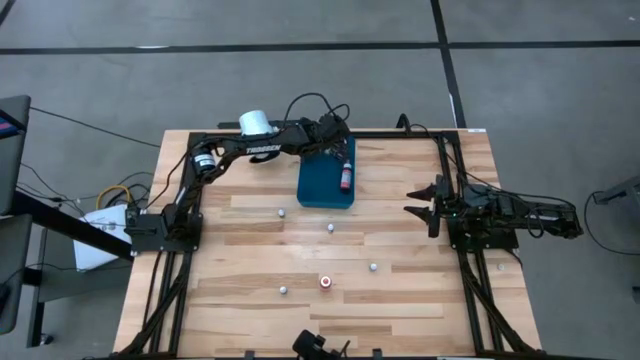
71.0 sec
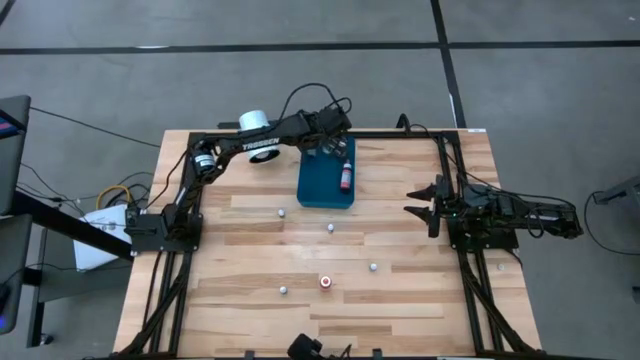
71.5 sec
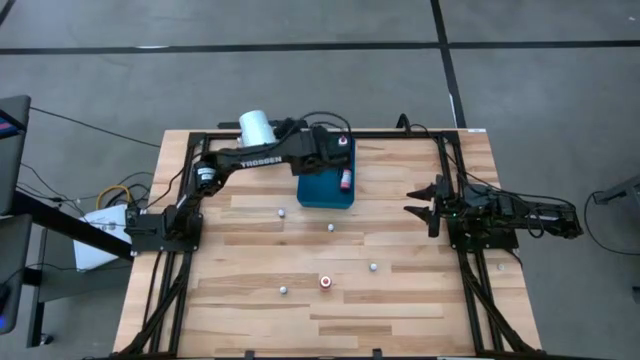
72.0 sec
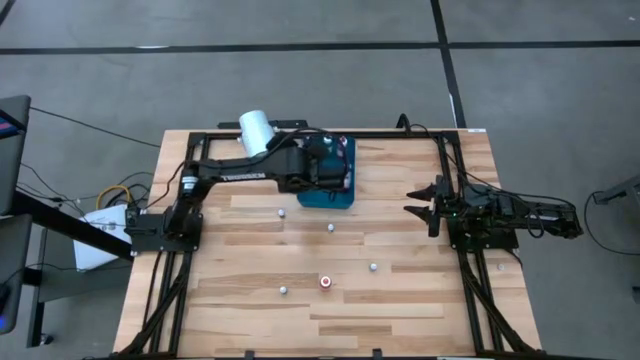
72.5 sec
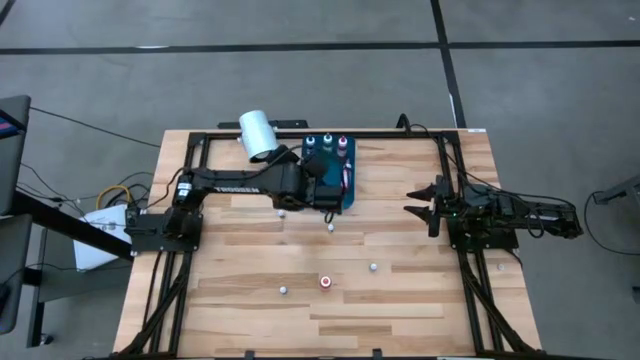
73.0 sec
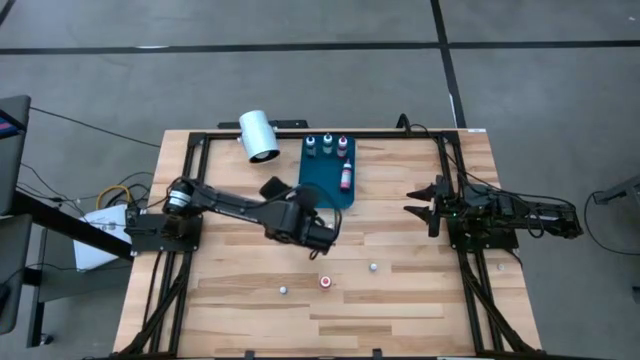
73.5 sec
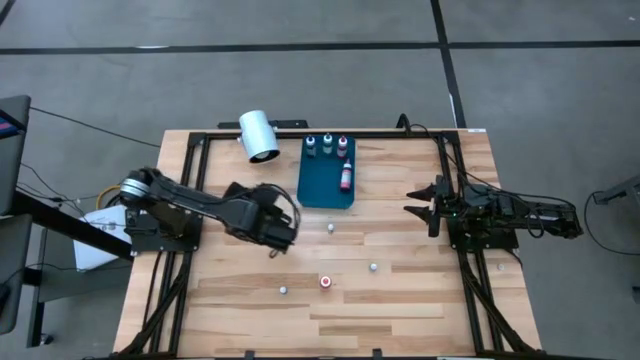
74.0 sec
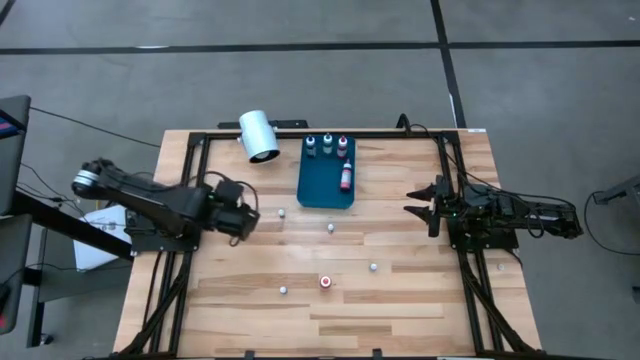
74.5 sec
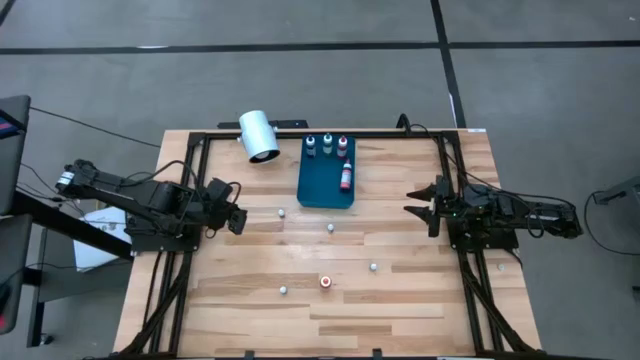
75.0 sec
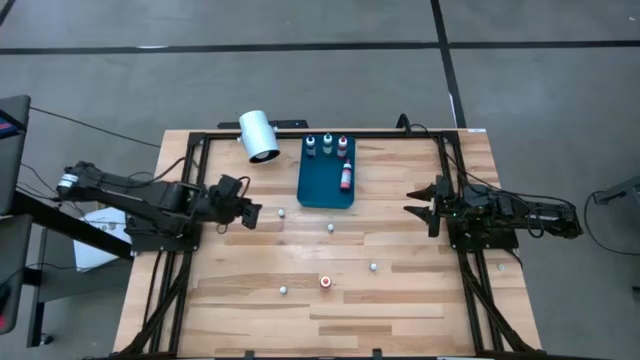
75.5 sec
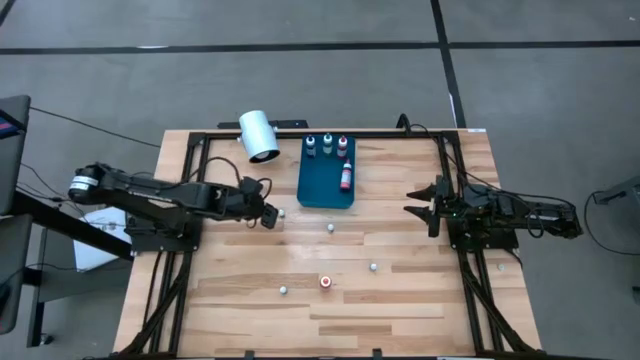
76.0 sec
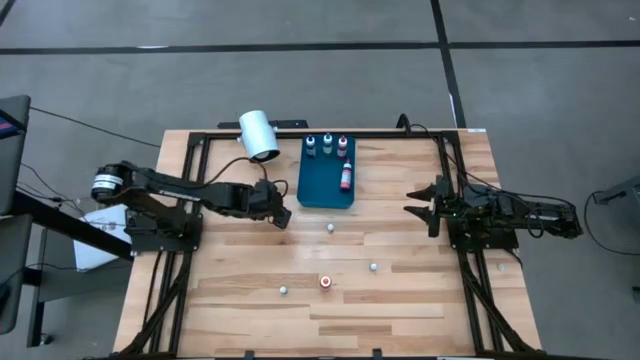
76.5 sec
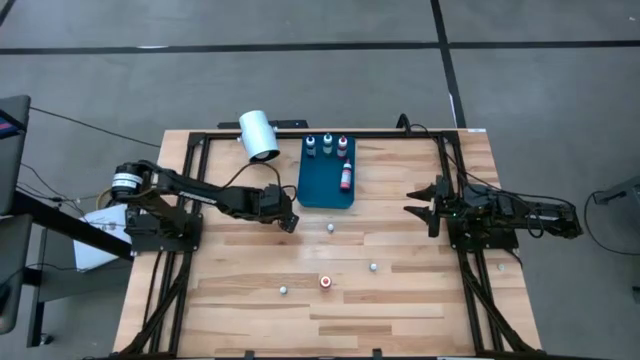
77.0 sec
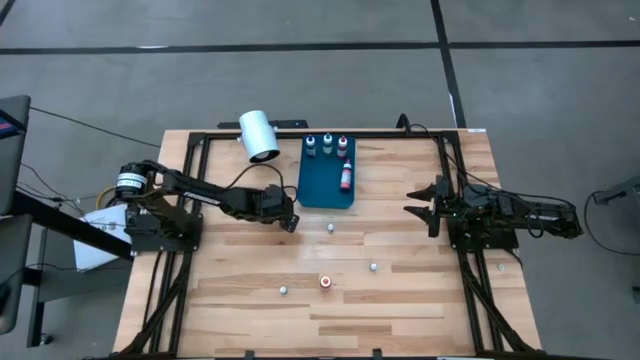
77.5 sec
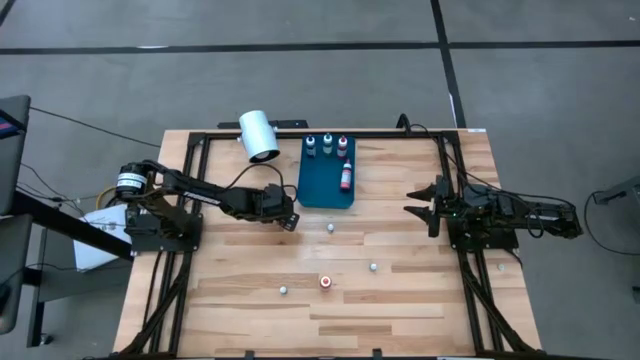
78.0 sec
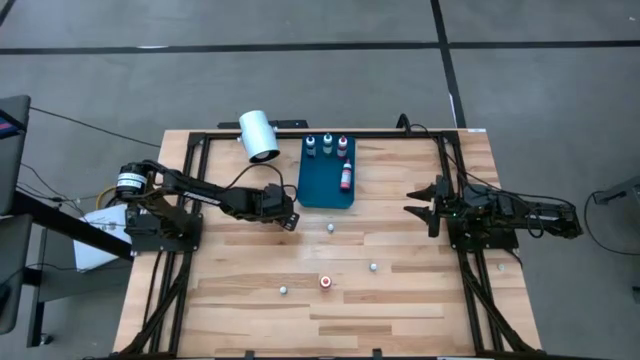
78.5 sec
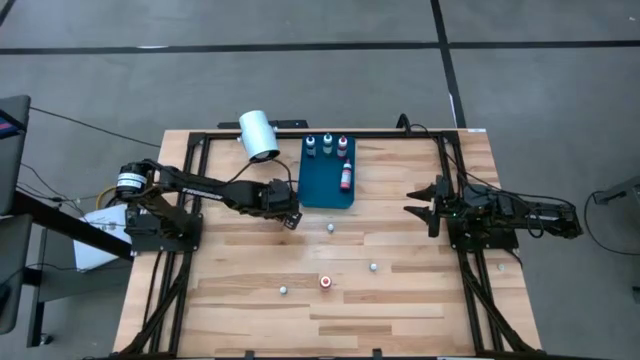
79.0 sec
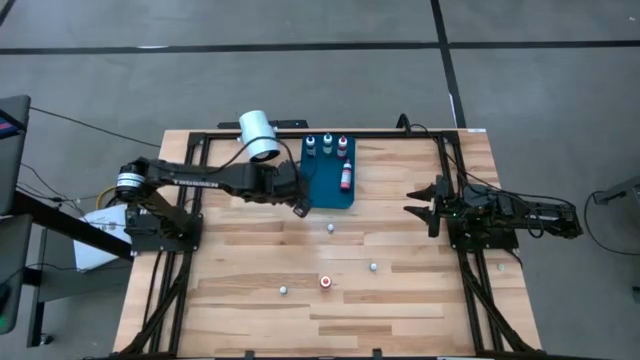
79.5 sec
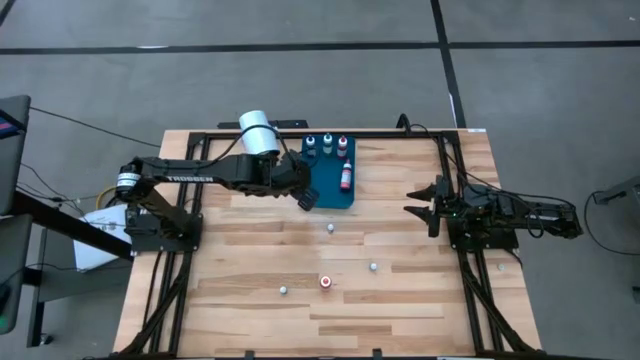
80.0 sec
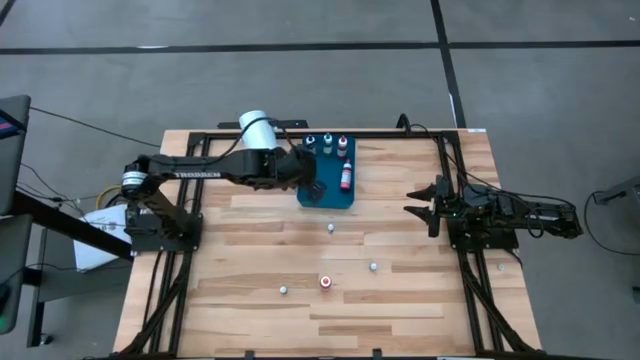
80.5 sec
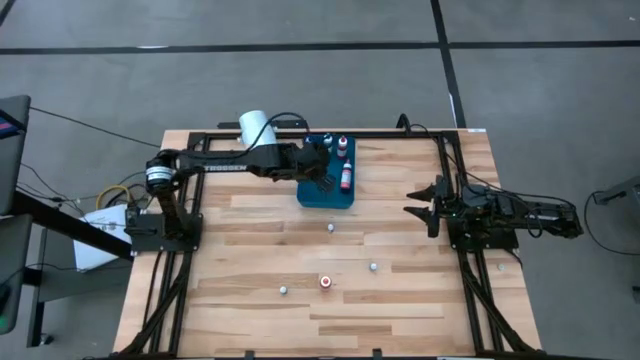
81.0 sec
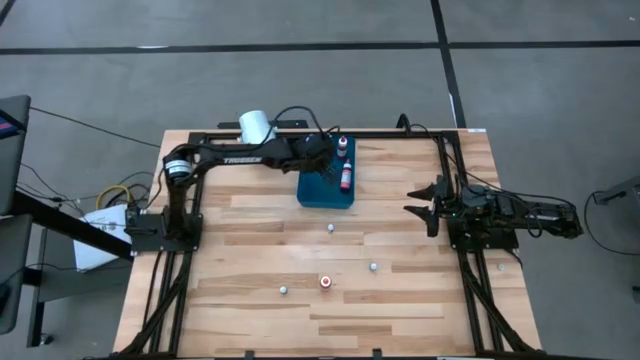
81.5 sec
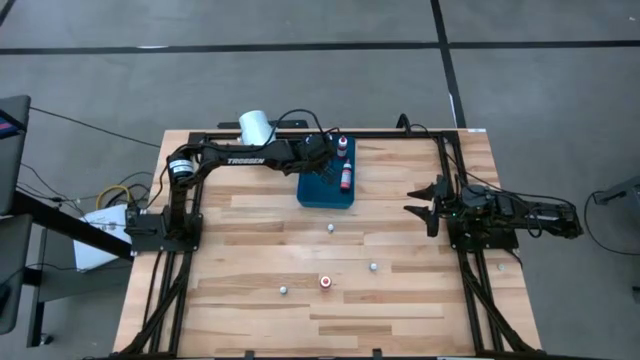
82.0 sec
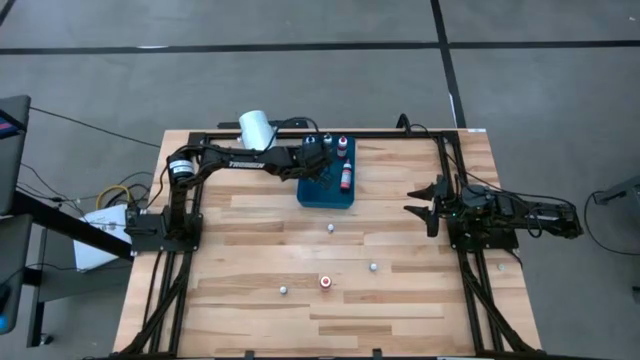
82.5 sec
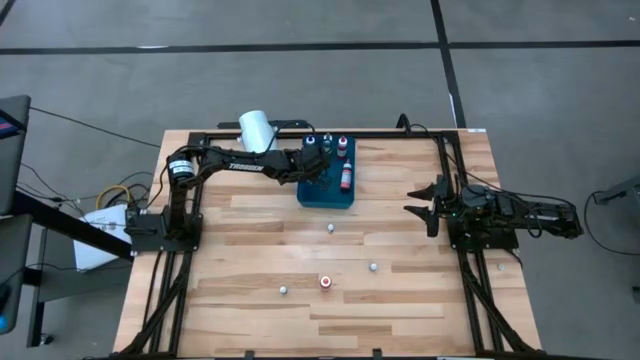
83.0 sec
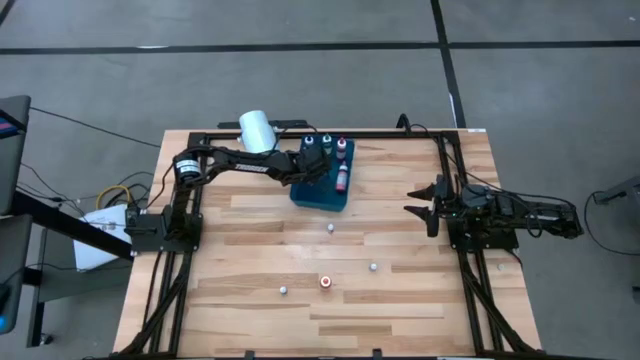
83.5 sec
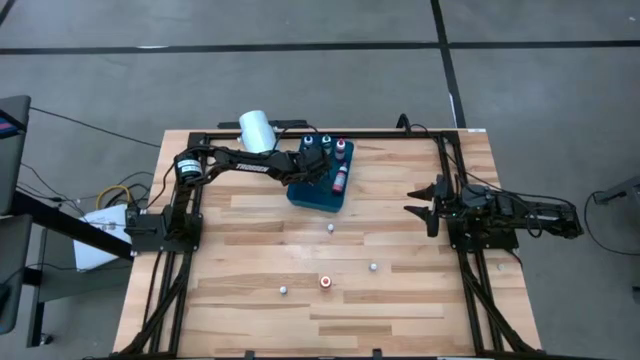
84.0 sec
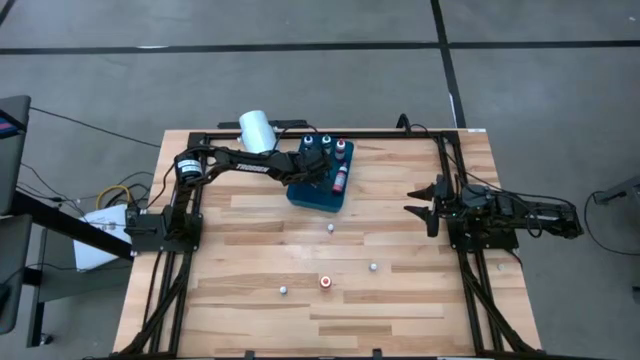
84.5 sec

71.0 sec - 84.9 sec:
Task: Pick & Place food coloring
Put the small left green food coloring bottle into the blue bin

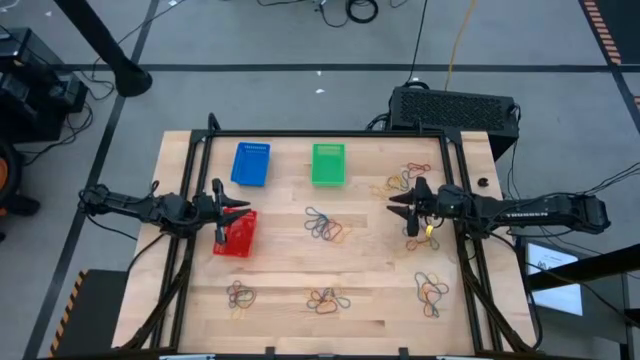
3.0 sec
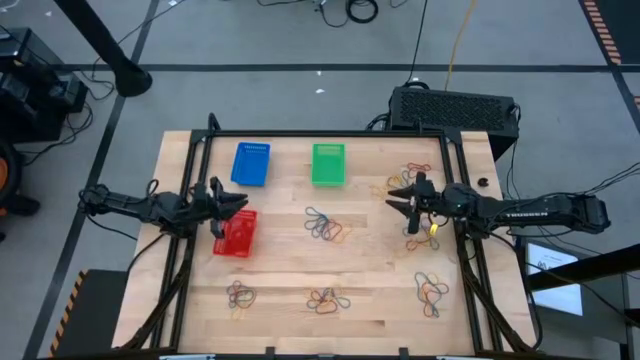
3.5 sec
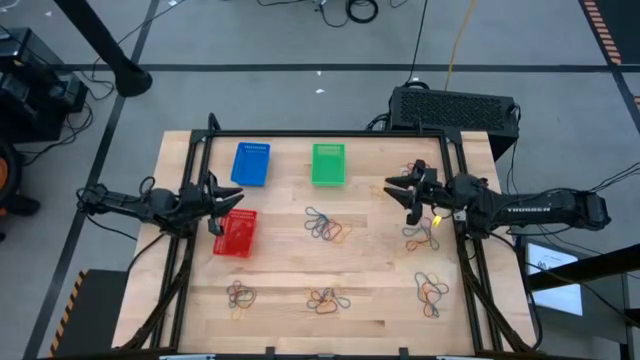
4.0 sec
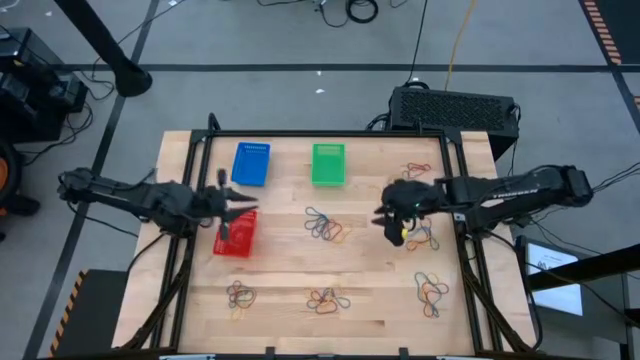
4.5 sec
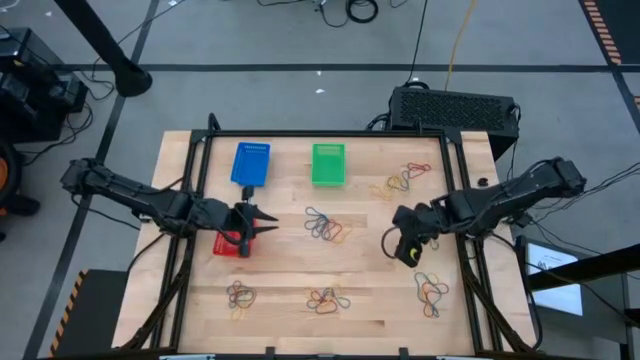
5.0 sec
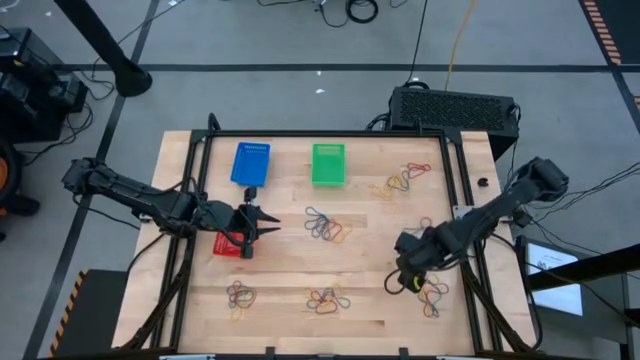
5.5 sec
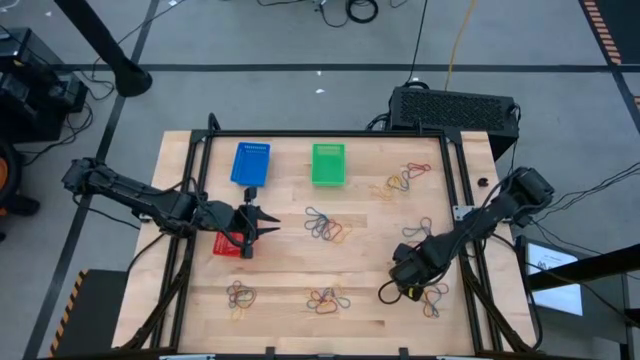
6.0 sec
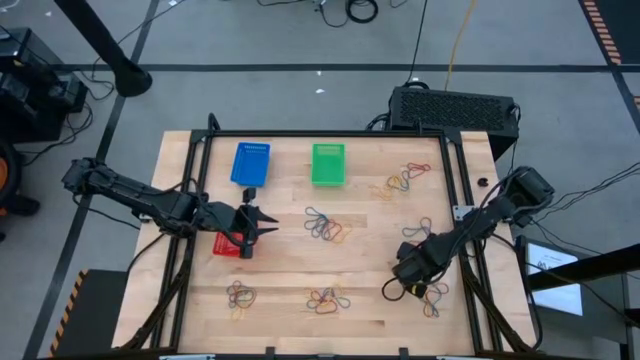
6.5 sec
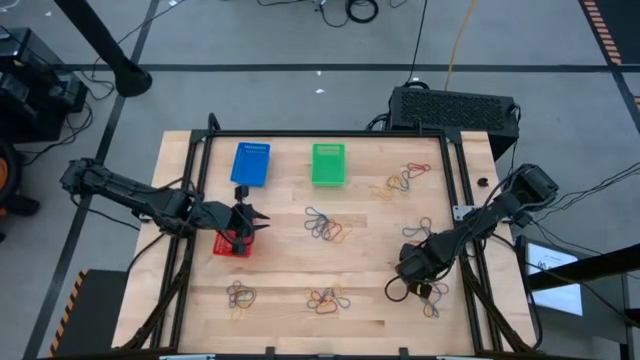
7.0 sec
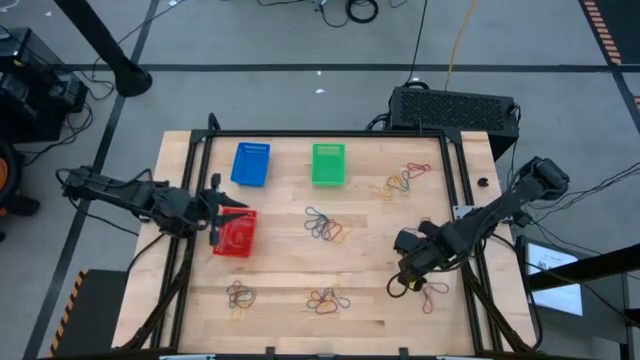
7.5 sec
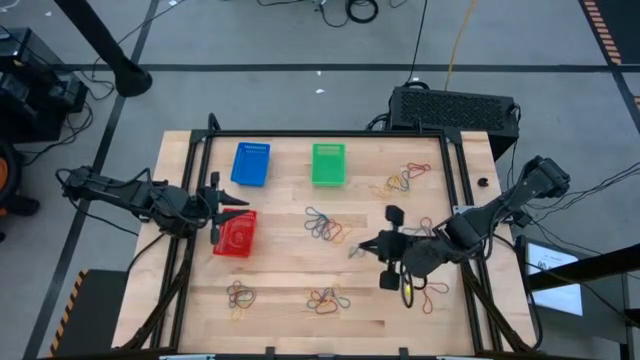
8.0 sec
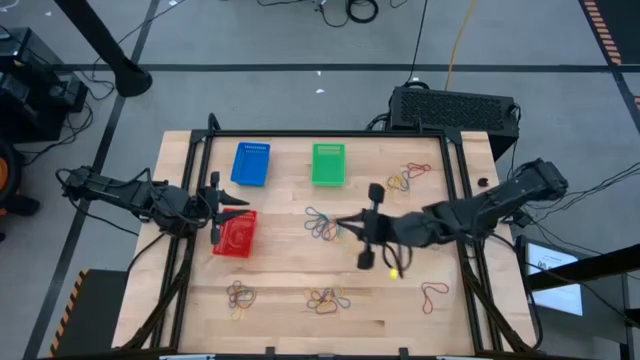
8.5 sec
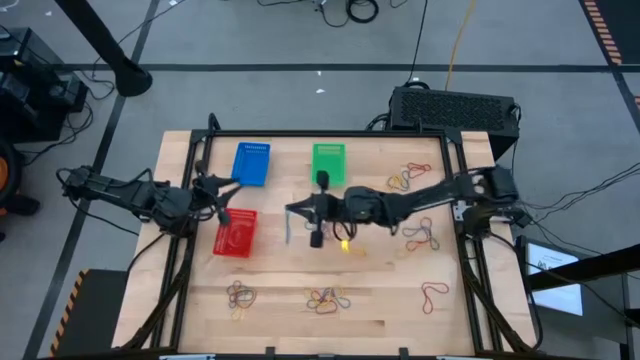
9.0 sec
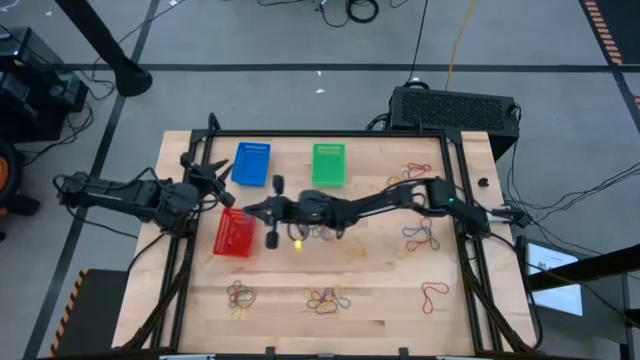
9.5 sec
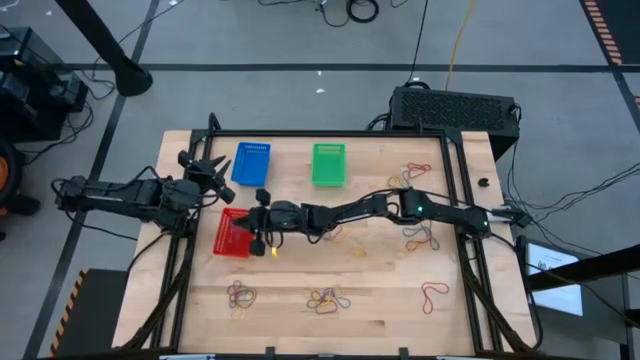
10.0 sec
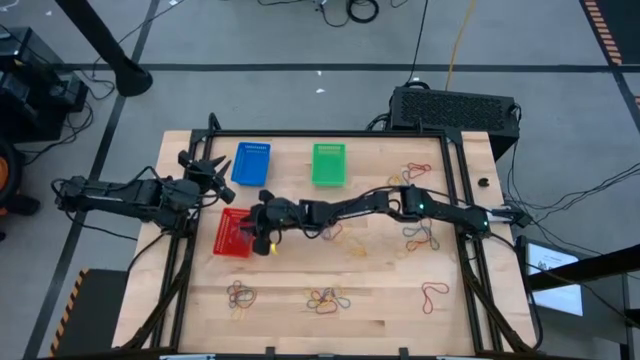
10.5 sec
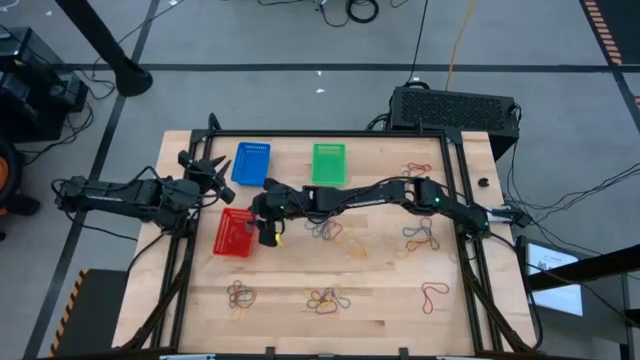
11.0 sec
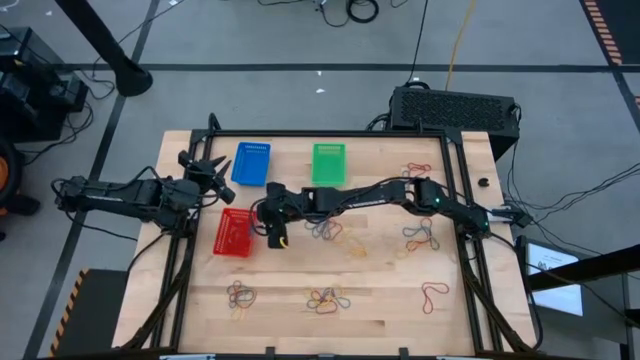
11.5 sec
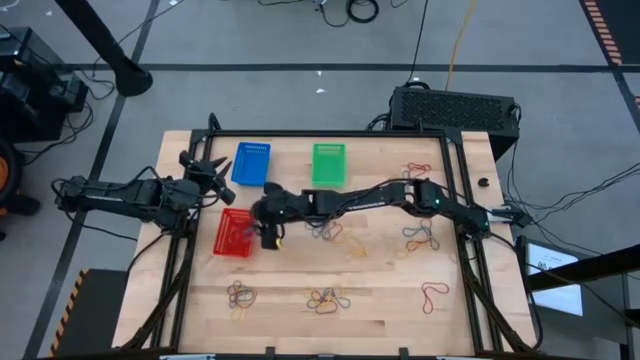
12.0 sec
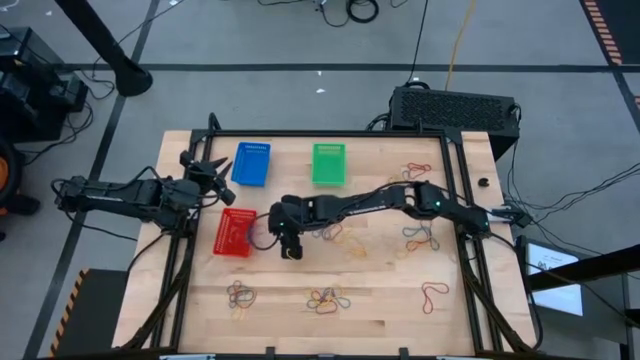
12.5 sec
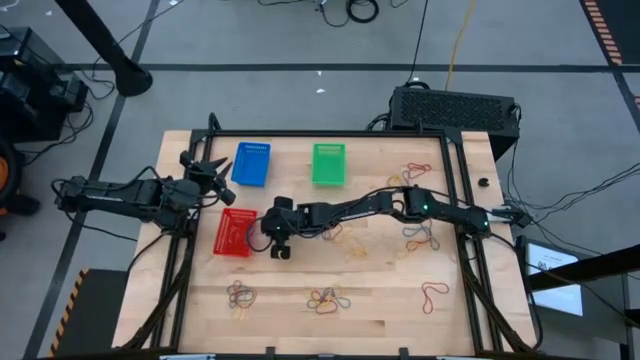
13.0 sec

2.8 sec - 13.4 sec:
Task: Sort rubber bands into baskets
Put the blue rubber band into the red basket
